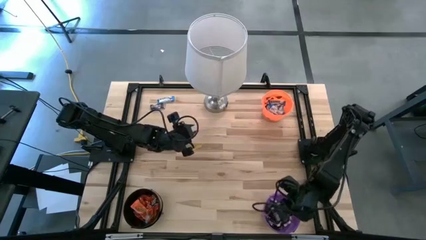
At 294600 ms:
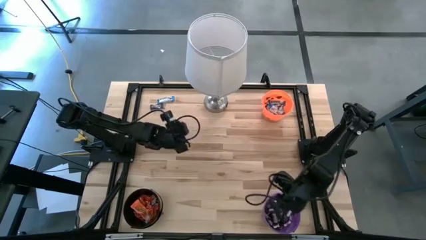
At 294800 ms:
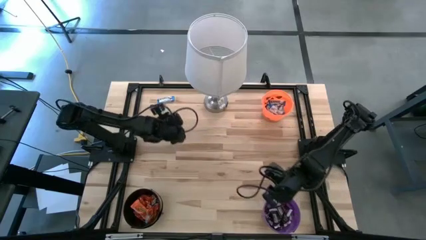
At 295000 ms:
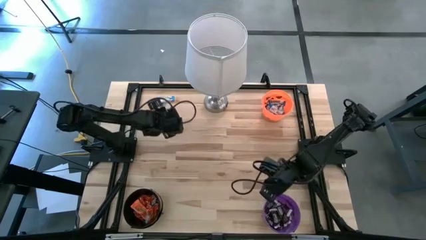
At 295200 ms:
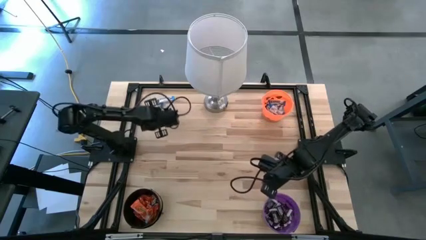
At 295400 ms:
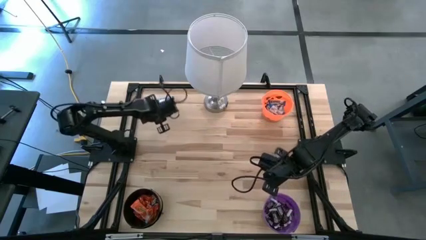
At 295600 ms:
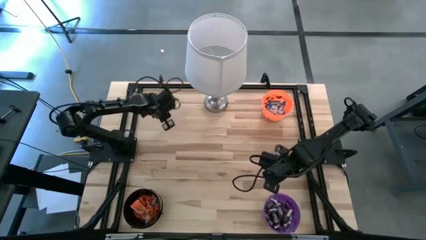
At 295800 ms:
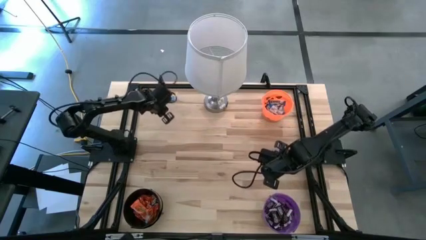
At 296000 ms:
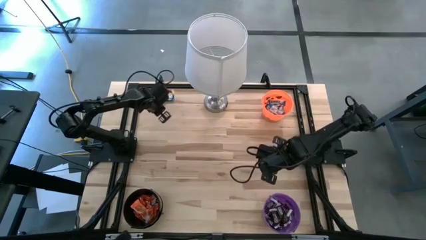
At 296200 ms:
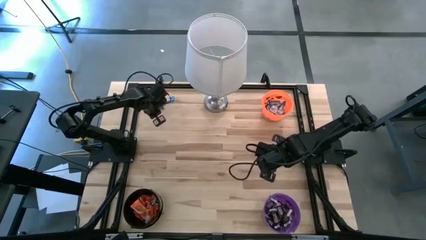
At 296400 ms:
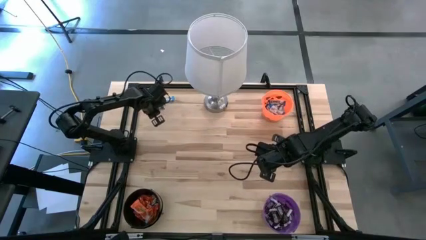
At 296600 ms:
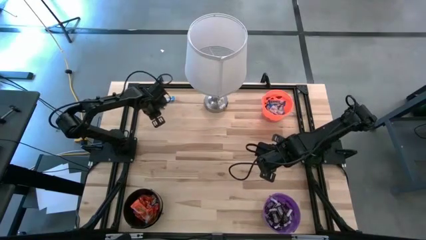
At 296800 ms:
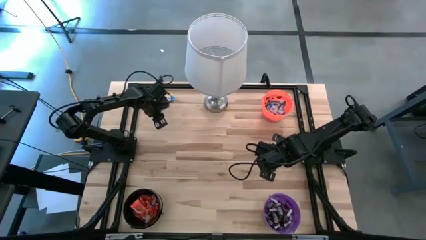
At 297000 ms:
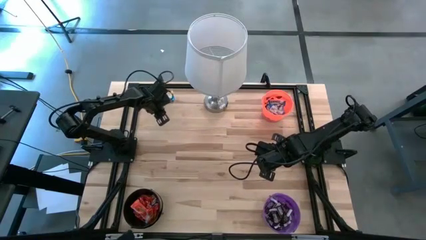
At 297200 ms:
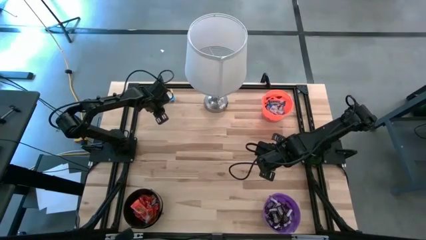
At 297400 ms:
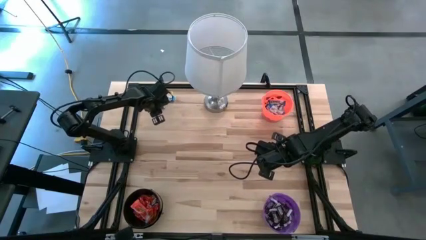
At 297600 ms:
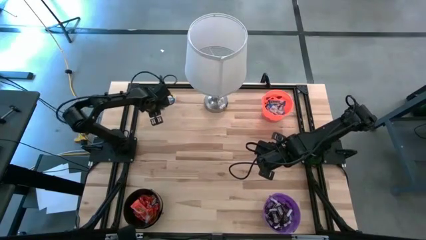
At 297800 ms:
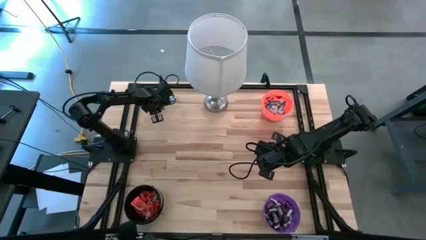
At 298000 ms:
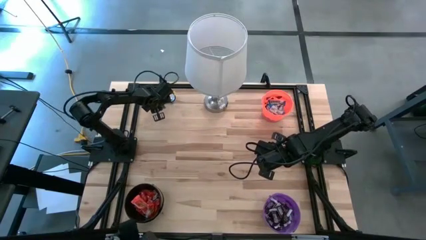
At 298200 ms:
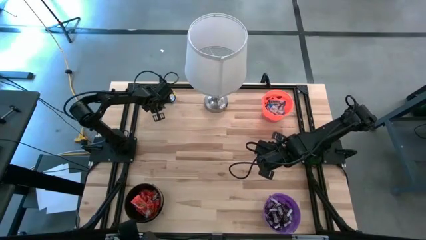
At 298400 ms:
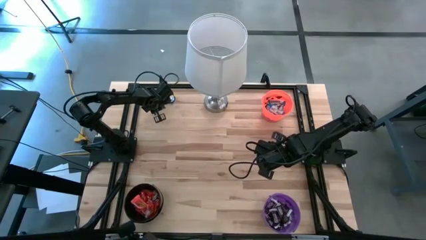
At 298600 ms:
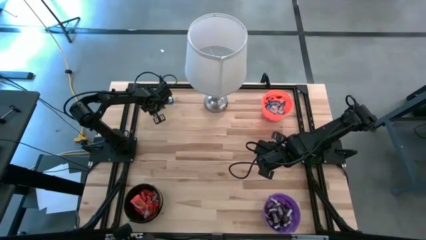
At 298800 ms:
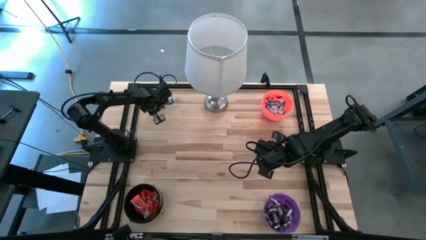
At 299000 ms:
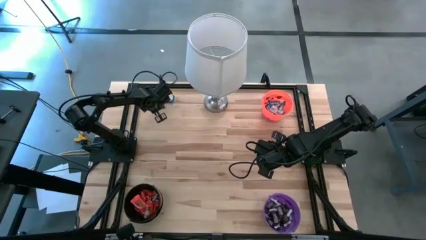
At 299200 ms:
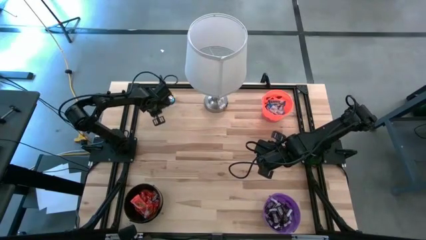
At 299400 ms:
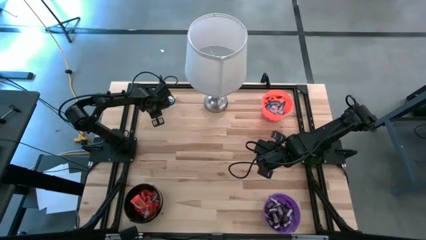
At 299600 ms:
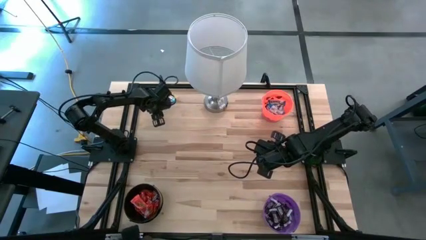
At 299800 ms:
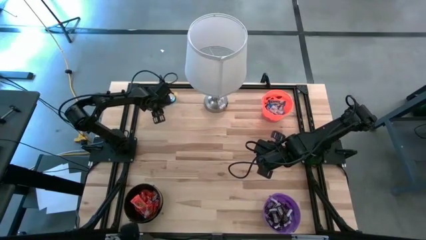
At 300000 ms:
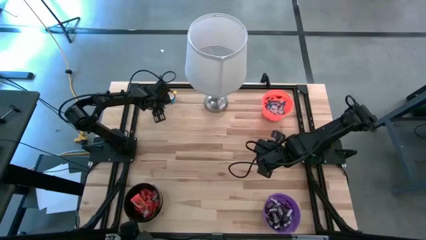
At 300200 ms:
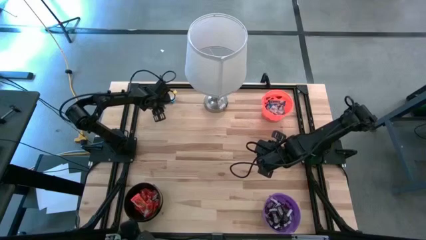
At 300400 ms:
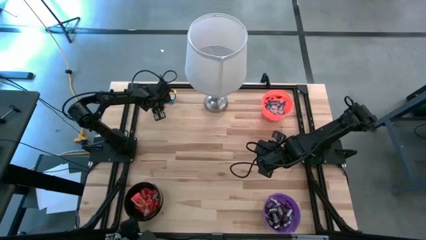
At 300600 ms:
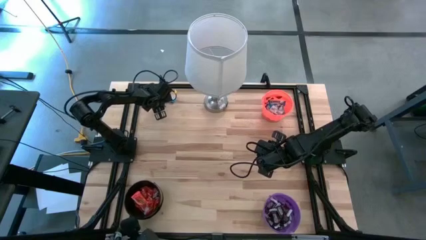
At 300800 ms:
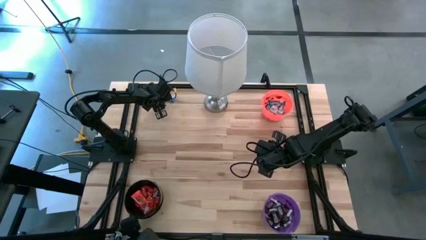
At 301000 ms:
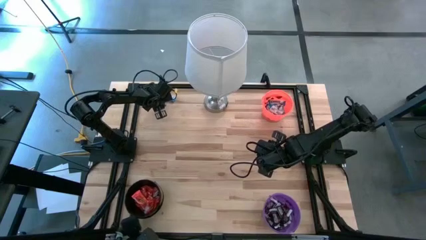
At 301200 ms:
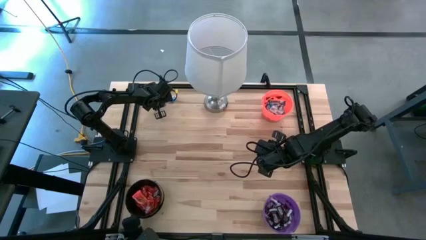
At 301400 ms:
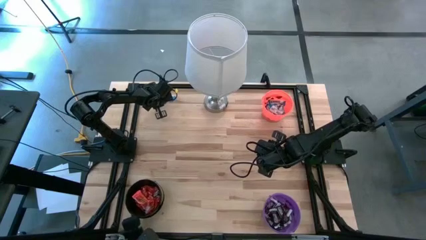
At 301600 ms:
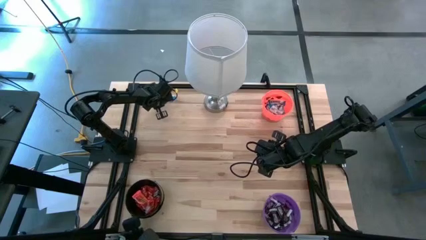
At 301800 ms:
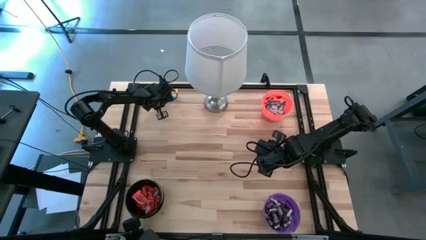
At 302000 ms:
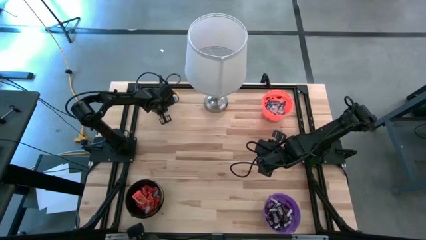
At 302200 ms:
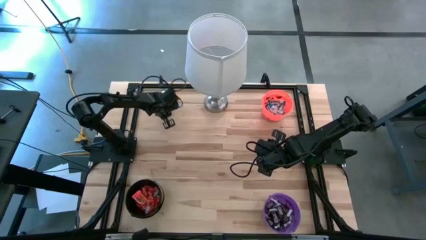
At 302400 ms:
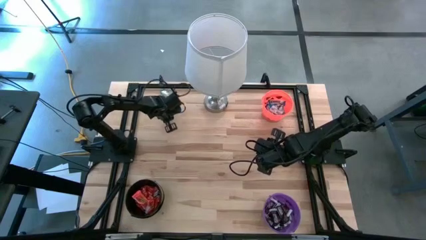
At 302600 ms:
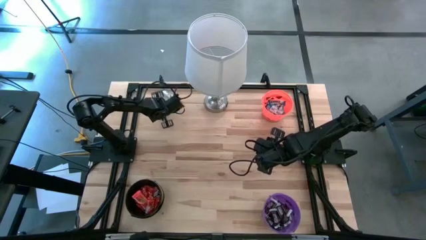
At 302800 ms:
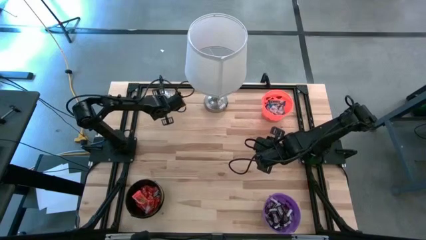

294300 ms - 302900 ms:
Task: Sort candy
Put the brown chocolate bar into the violet bucket

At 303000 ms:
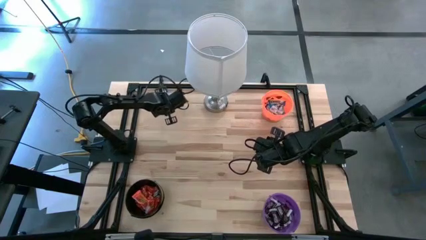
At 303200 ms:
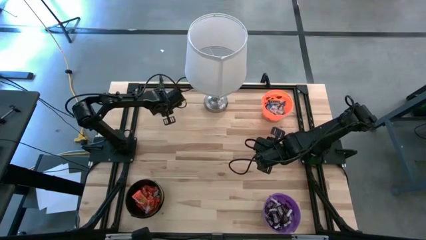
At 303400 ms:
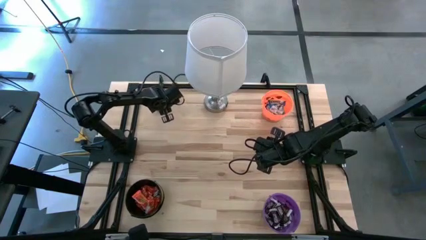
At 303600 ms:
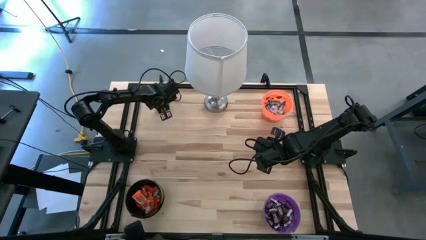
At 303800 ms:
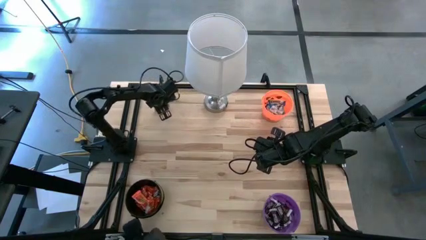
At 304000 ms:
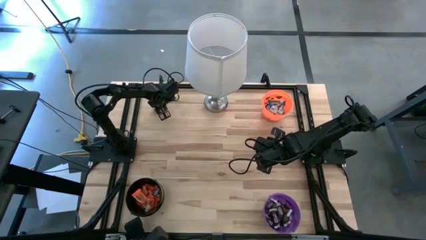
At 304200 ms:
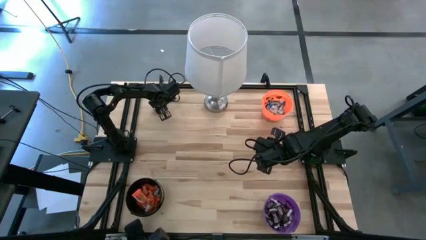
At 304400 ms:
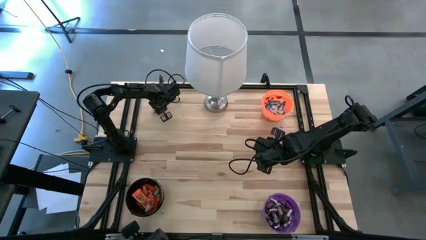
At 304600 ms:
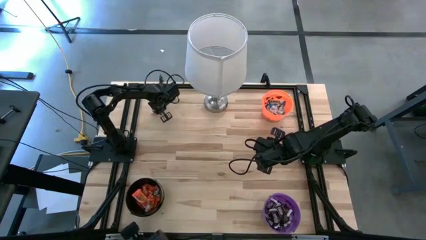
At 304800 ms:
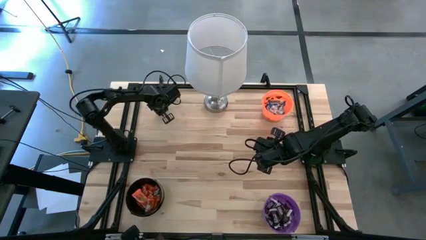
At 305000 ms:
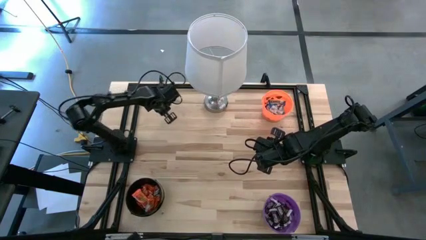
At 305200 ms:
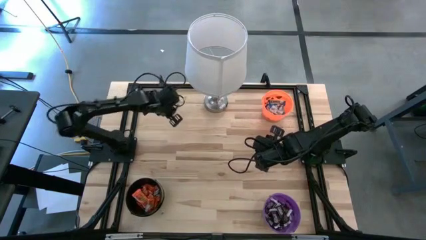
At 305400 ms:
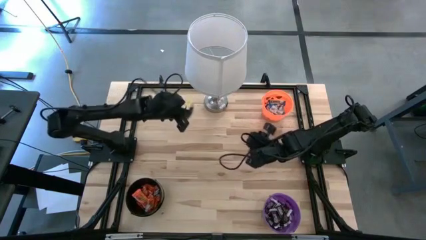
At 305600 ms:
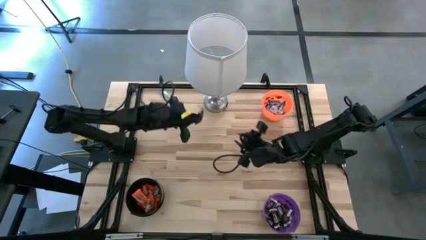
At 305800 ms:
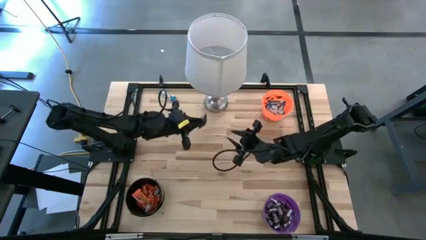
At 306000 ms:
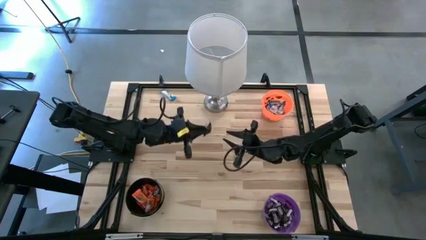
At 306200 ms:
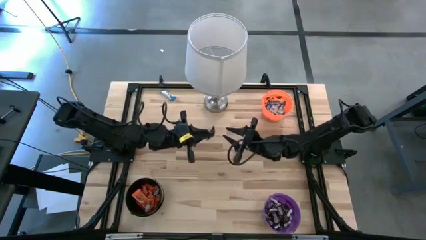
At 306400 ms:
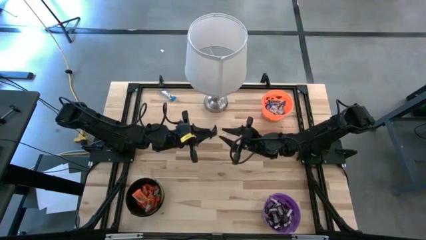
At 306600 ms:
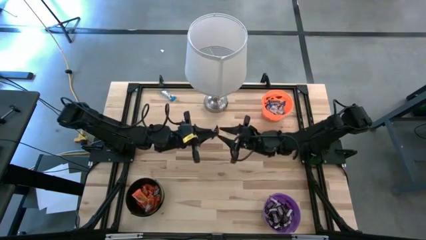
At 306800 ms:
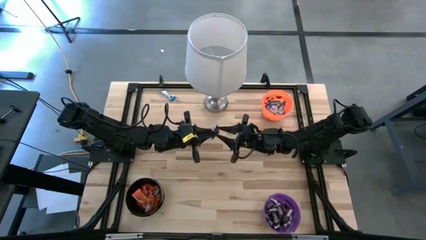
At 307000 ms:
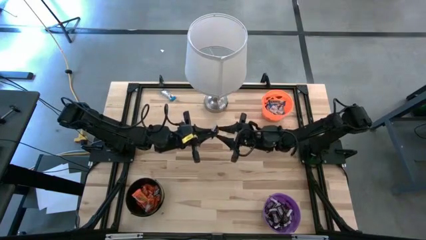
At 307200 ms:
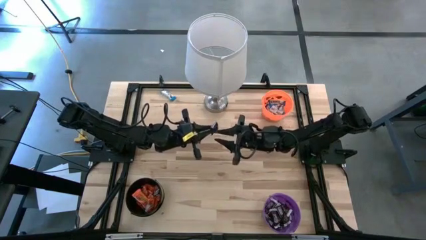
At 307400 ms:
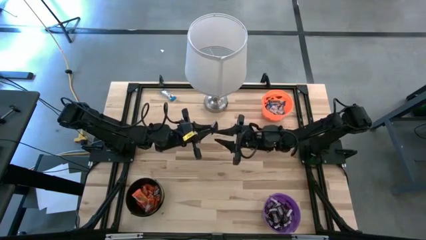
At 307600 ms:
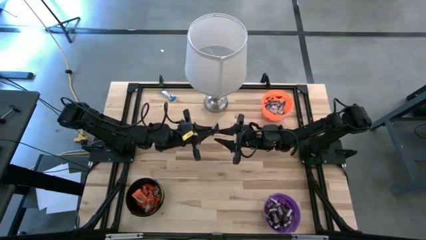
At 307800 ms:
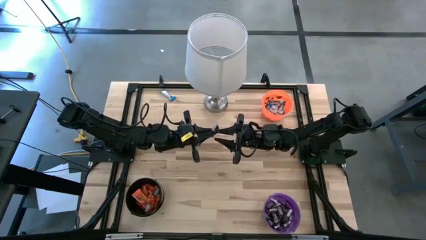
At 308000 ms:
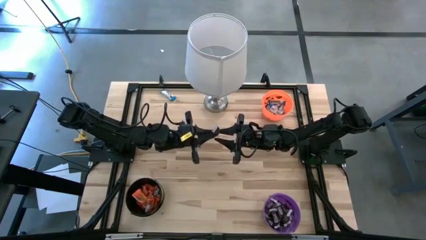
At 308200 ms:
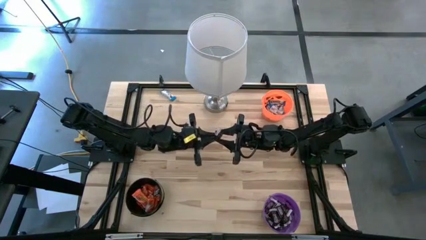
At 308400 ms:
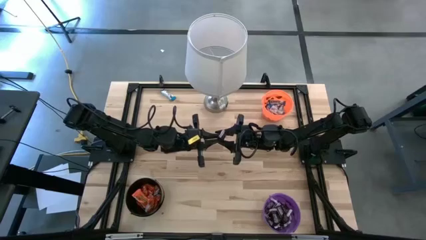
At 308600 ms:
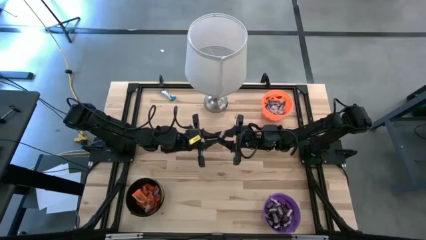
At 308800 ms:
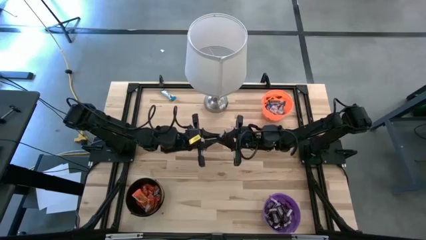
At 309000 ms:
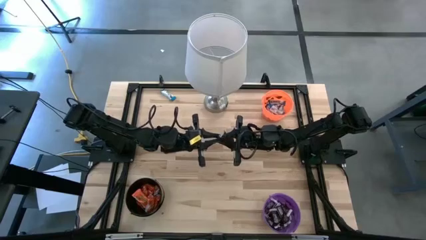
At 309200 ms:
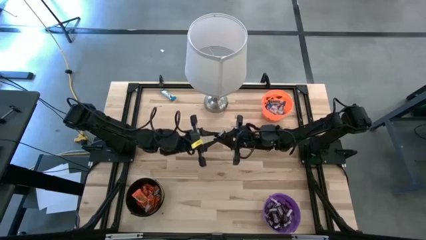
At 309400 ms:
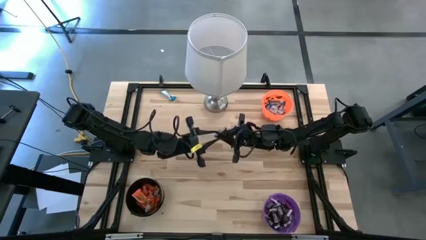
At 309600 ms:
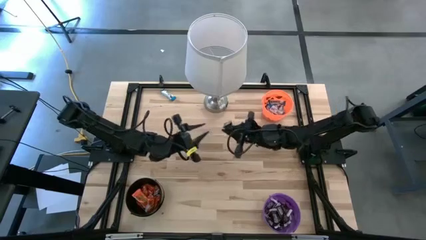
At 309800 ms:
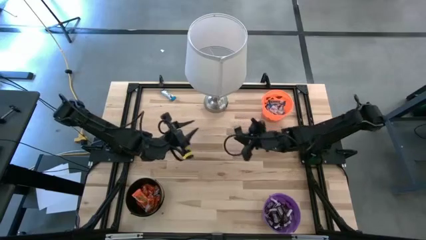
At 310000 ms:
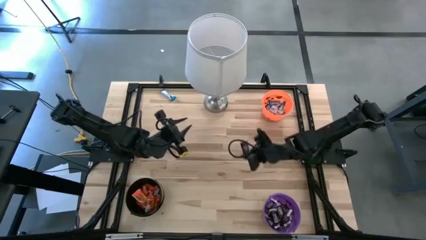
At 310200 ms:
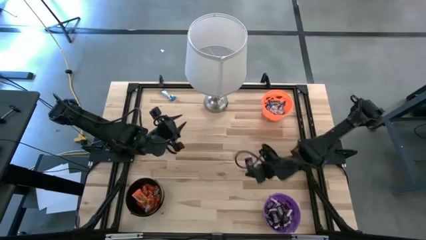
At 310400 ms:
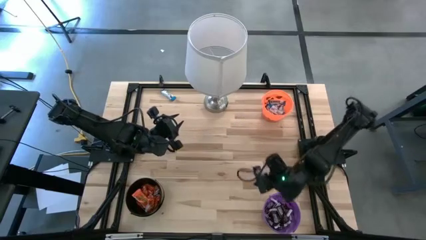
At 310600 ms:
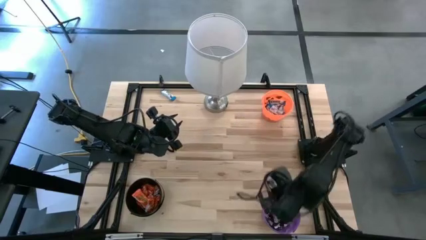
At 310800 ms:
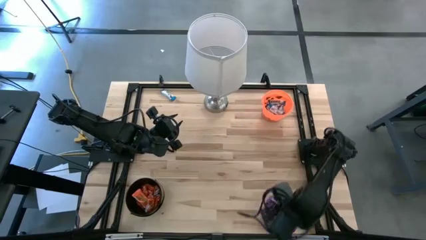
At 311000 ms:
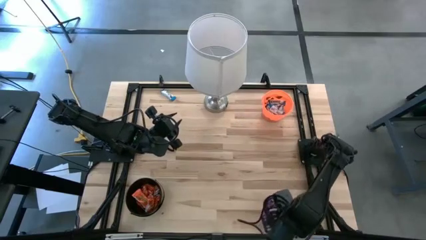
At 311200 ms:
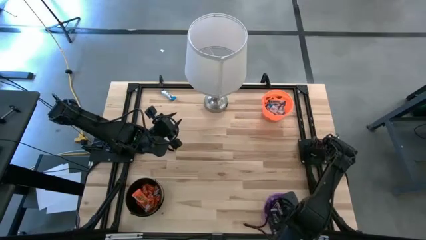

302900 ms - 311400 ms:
Put the brown chocolate bar into the violet bucket
